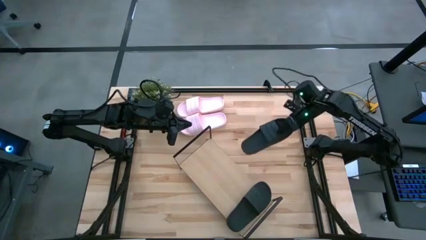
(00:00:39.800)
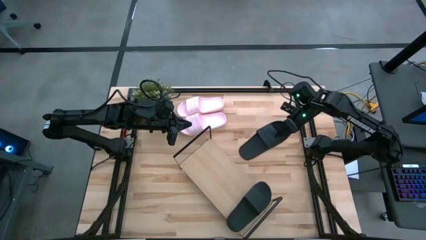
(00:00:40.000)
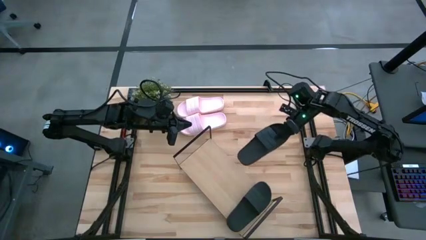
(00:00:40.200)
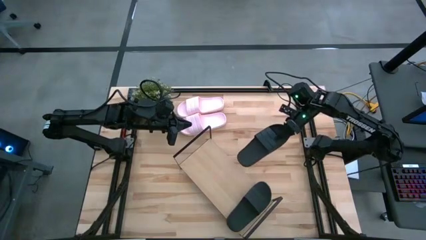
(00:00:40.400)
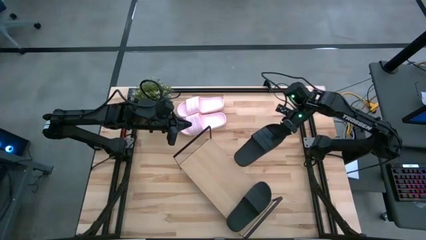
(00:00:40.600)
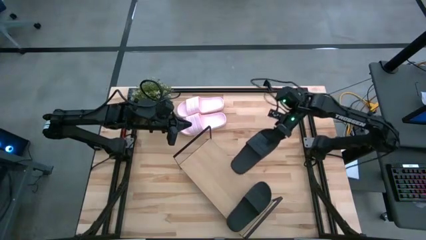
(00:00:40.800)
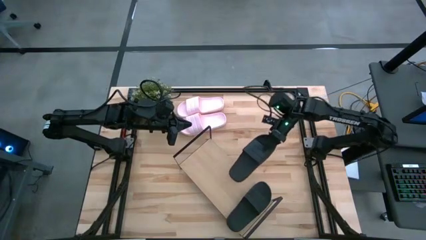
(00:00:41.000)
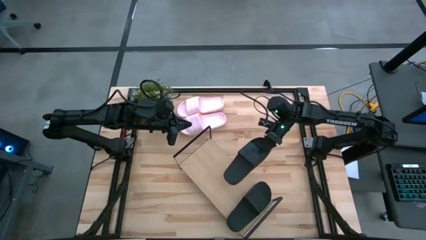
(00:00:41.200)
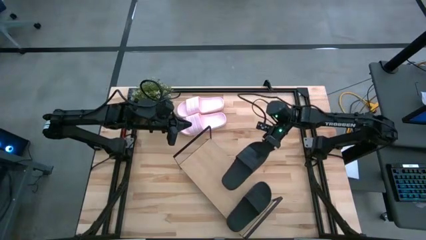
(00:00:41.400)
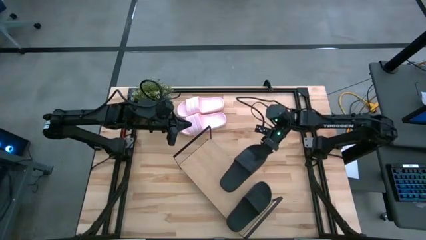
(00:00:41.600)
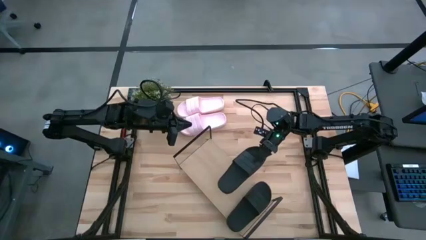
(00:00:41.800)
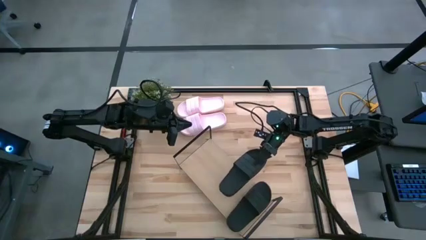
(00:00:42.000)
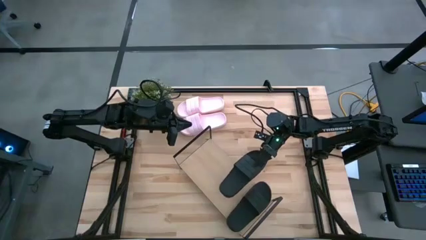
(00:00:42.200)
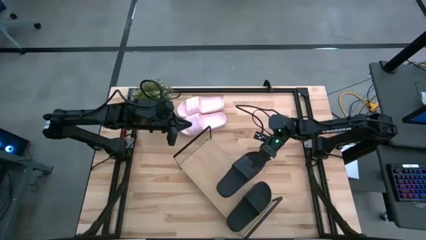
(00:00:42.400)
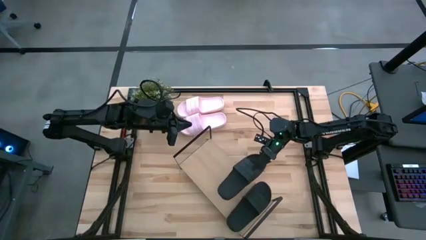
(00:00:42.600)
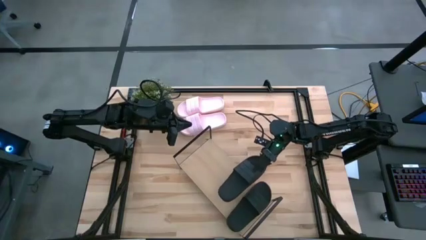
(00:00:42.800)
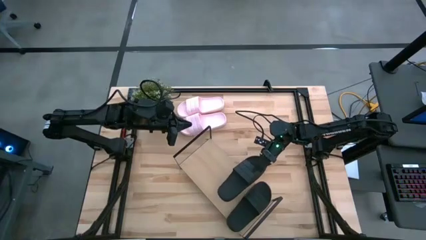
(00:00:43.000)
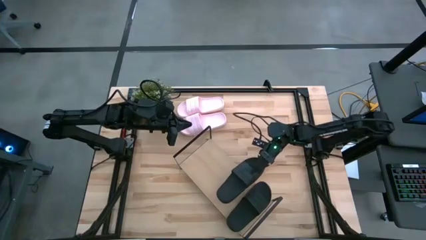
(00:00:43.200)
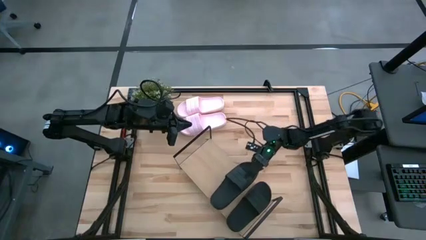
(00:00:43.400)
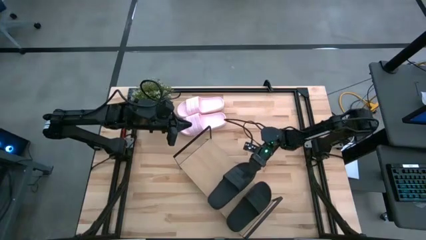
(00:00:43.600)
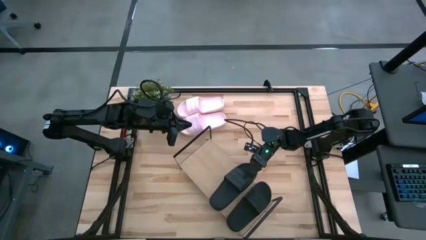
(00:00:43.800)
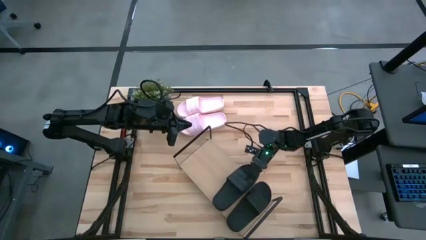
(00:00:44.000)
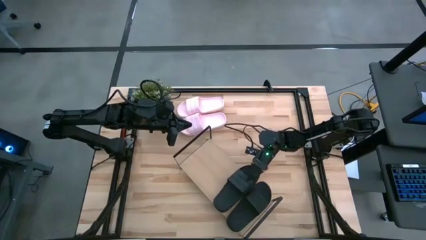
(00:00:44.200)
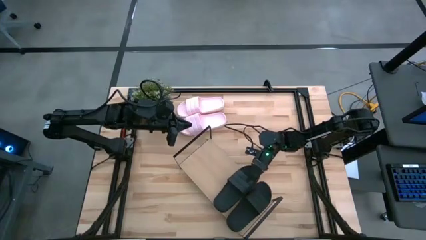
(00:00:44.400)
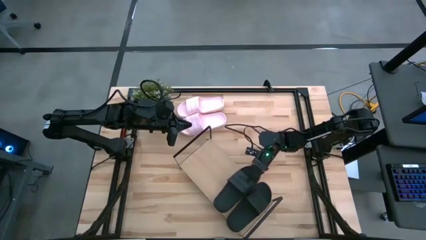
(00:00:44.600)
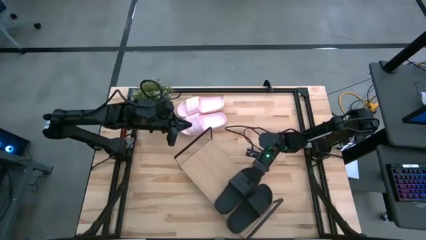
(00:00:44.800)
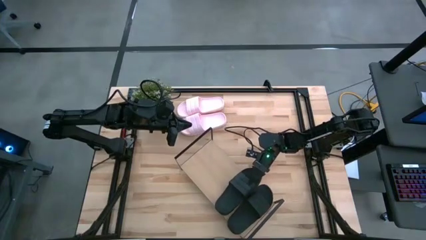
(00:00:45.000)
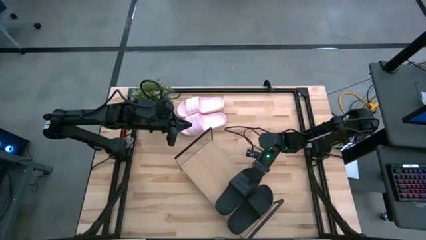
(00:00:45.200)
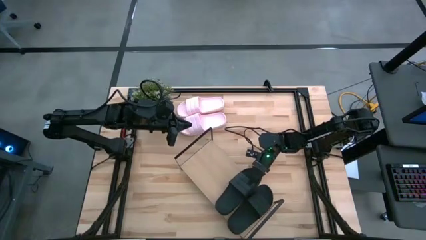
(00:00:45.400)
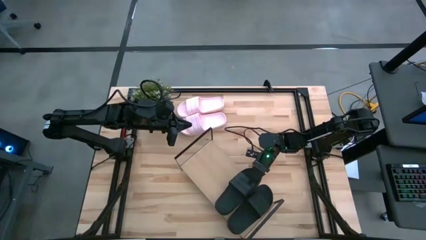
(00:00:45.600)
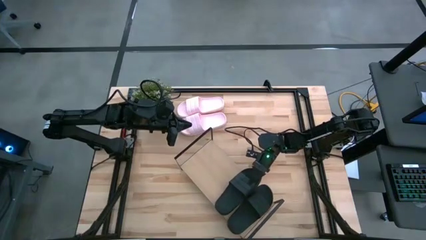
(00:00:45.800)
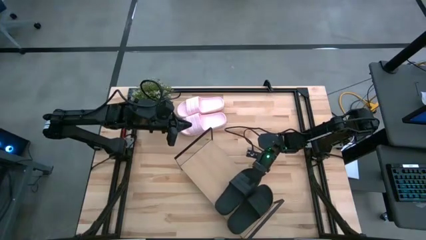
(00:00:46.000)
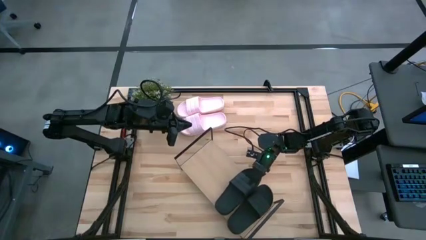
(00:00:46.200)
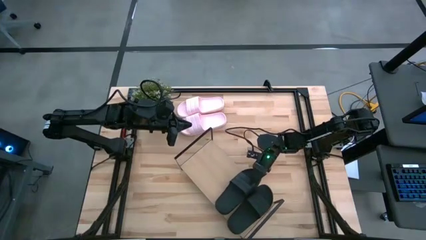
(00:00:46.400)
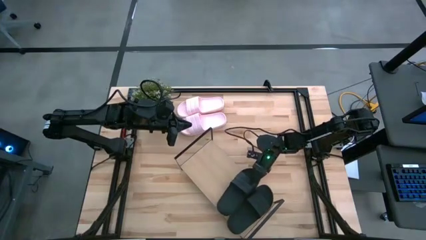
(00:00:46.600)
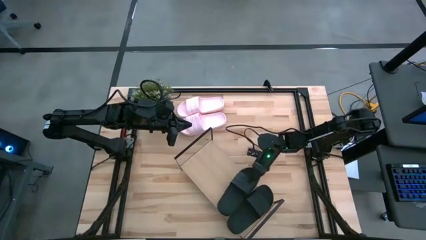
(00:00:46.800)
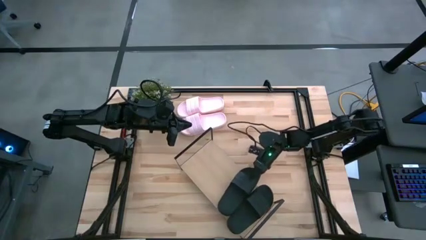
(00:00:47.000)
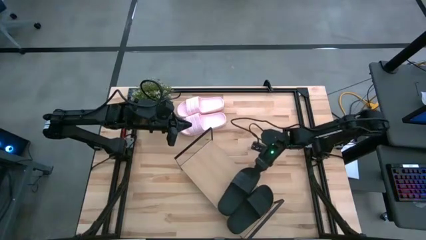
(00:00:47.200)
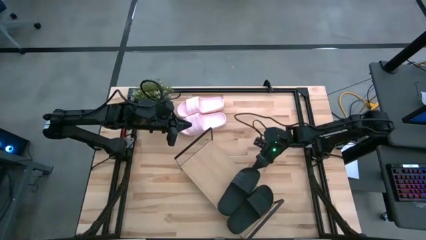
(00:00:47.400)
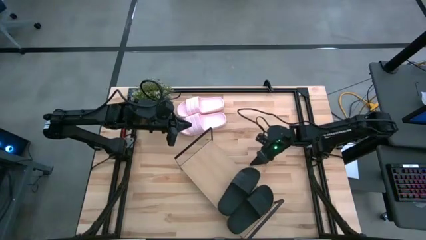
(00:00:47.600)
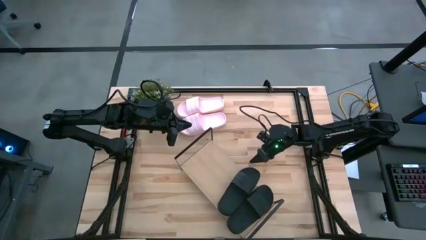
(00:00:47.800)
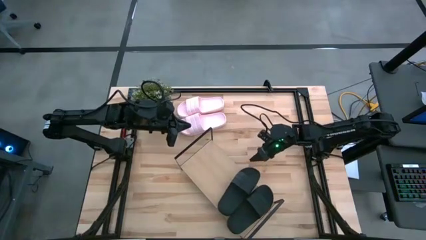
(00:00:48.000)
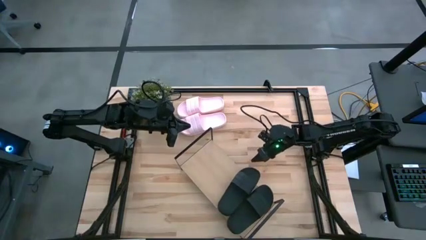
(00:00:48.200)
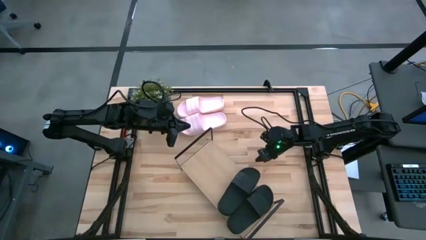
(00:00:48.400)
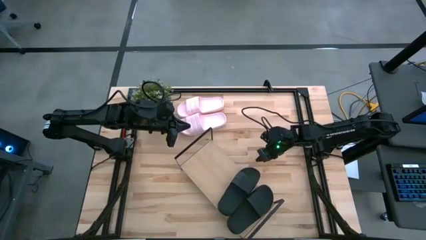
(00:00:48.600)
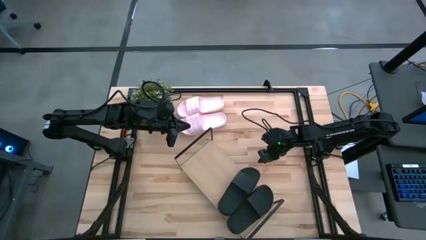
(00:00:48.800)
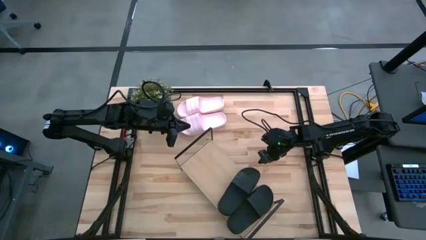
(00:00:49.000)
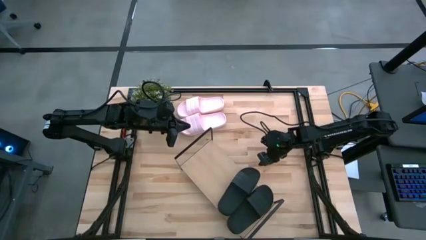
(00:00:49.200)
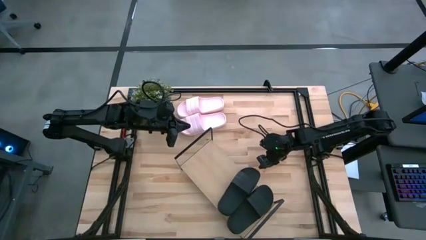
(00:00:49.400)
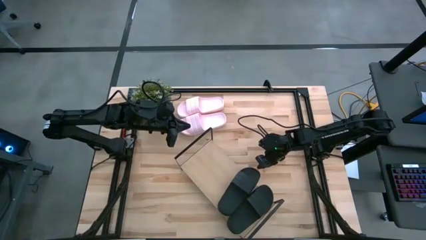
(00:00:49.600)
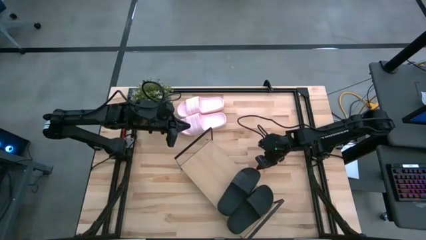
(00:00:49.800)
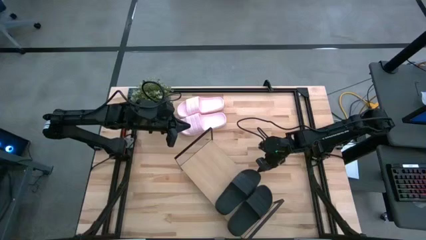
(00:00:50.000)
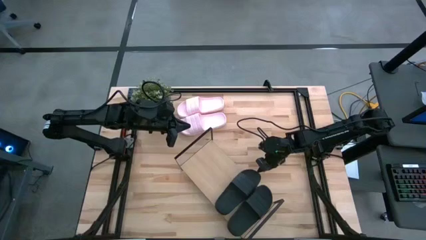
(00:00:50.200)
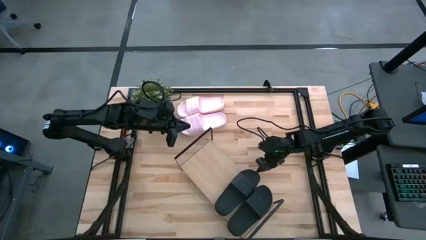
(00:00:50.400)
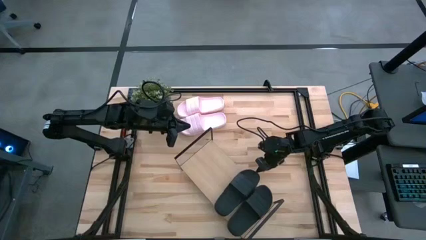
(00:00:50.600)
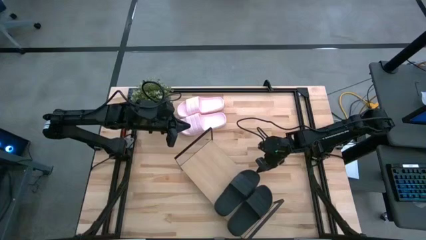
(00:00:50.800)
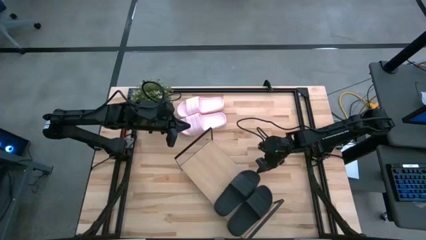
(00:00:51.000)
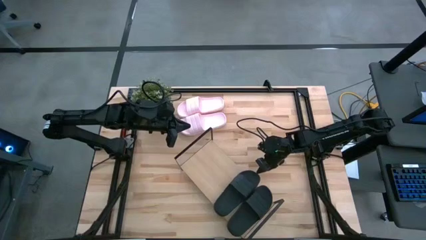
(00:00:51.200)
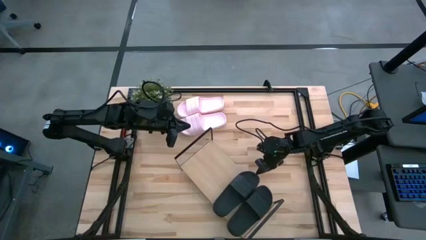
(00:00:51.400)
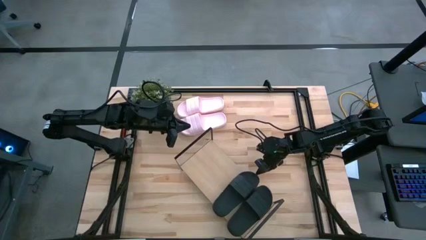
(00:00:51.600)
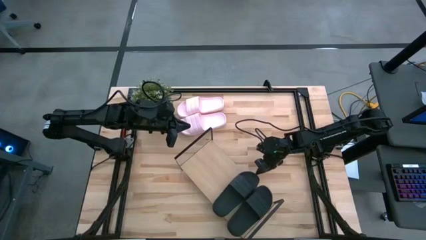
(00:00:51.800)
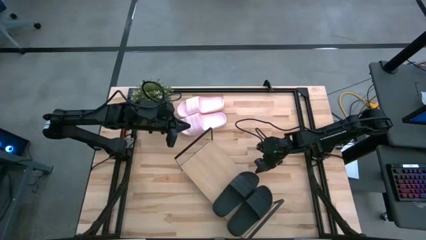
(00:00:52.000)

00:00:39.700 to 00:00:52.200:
Task: Pick and place slides into the shelf
Put the black slipper on the shelf beside the other black slipper

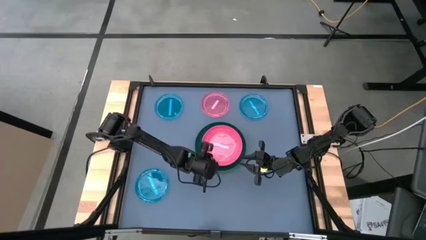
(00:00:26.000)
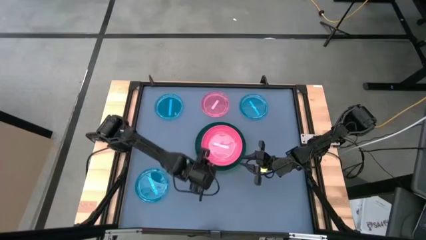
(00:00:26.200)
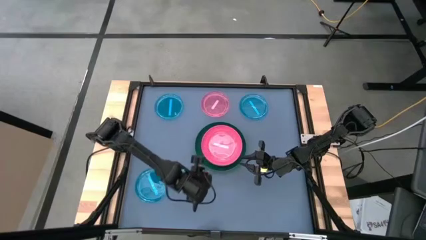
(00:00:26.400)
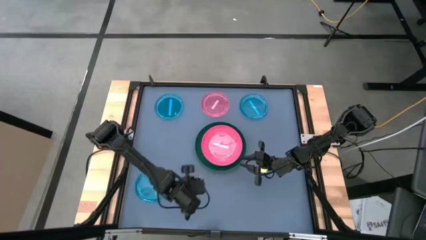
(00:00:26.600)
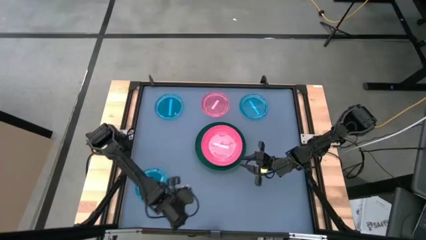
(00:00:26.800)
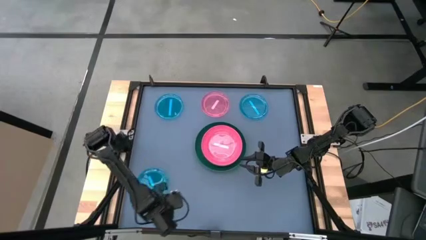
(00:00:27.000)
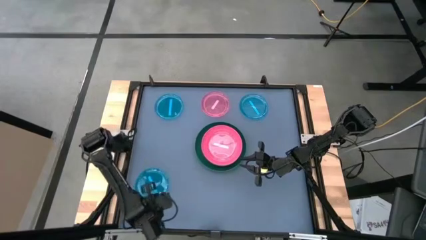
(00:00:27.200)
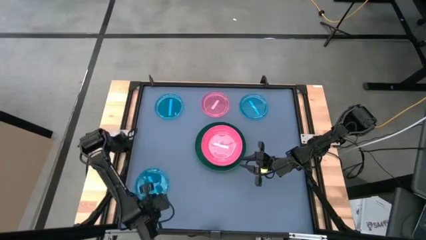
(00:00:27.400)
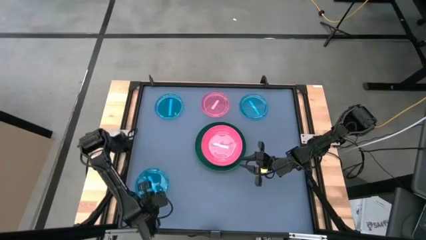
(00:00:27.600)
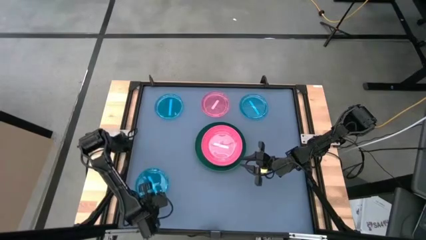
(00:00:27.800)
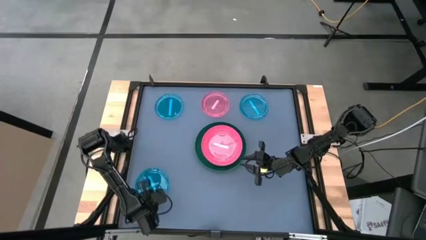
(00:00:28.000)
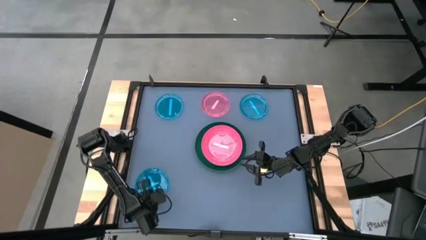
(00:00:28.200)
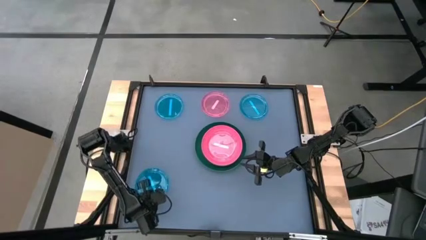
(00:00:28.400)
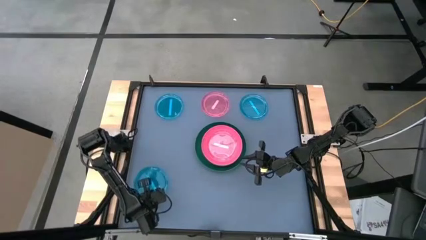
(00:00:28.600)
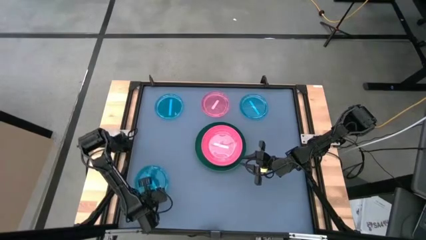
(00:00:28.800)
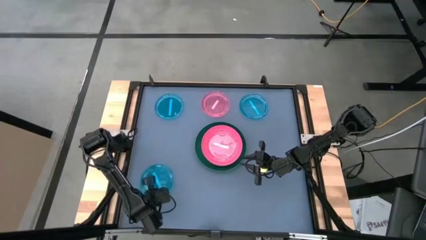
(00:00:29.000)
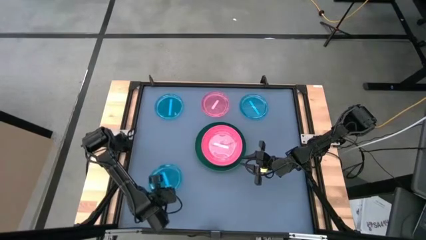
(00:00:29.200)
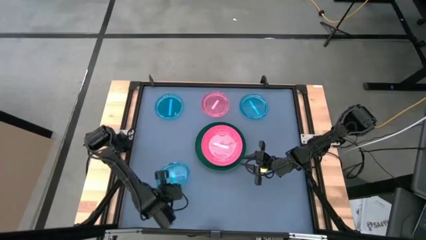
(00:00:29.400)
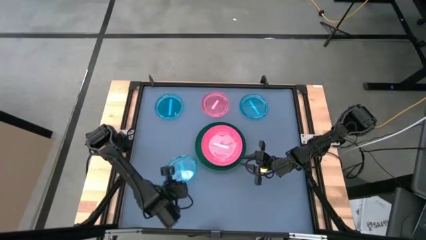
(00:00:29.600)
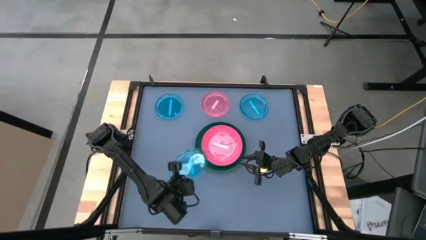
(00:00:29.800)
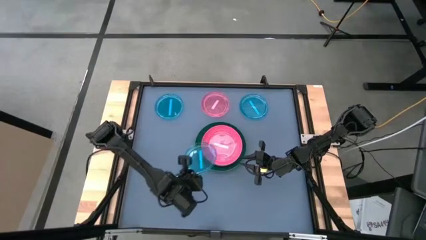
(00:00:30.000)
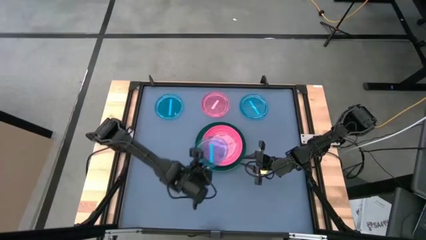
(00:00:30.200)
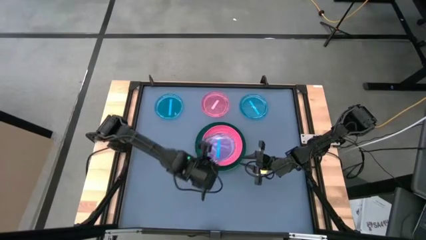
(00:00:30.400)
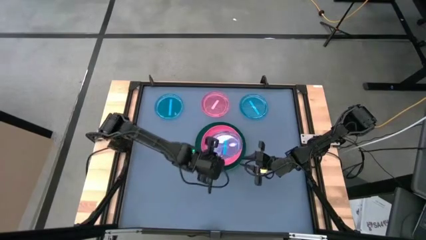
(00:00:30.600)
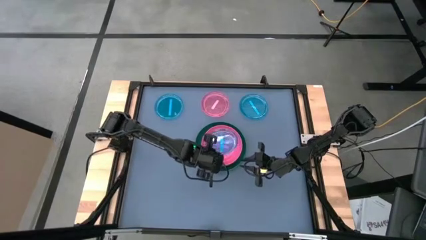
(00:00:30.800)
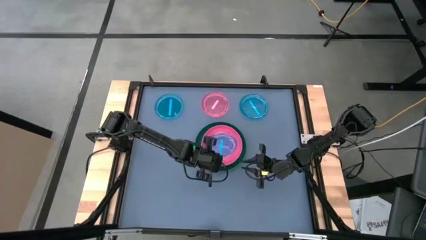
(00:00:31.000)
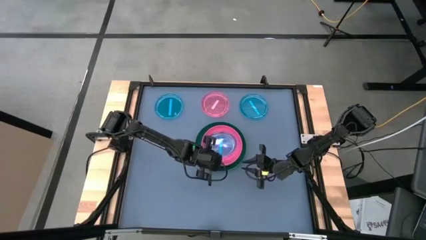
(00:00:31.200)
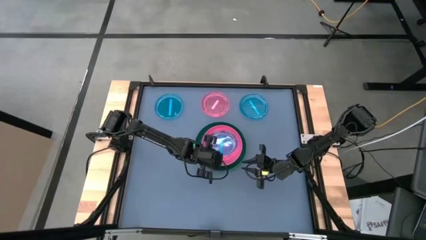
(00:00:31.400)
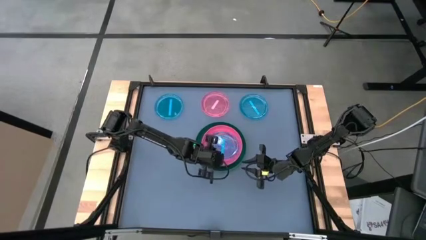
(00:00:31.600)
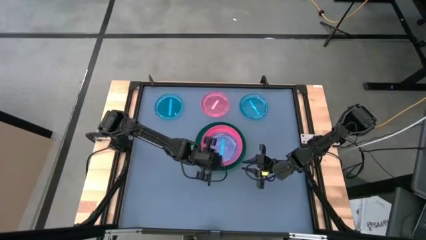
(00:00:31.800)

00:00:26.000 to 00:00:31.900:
Task: Stack plastic plates
Stack the blue plate on the light pink plate
